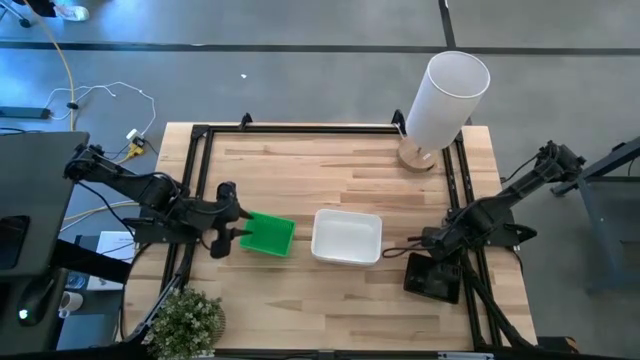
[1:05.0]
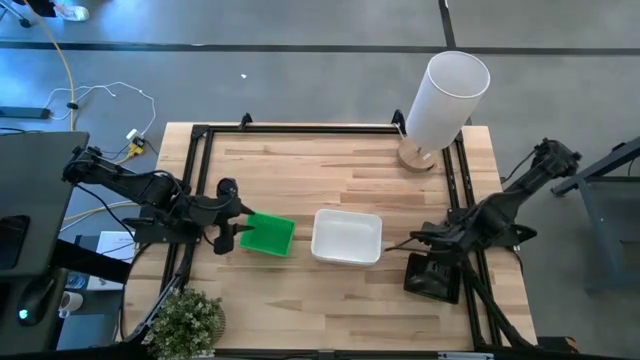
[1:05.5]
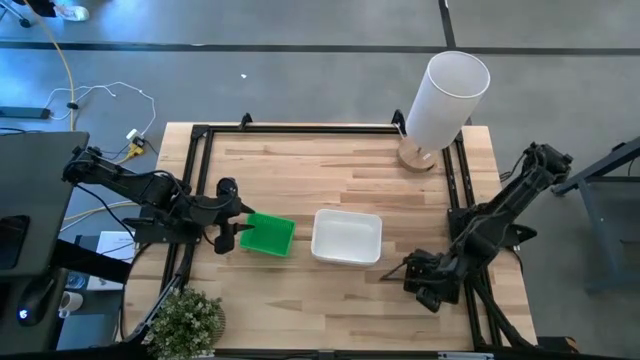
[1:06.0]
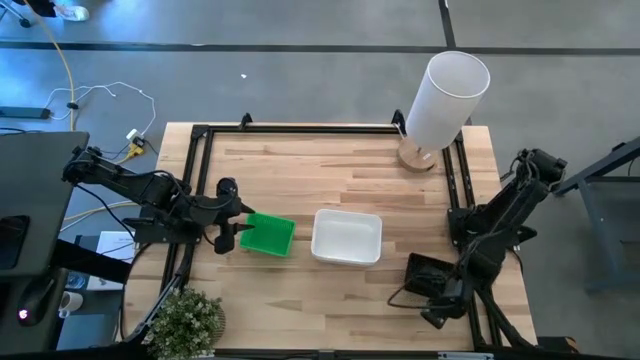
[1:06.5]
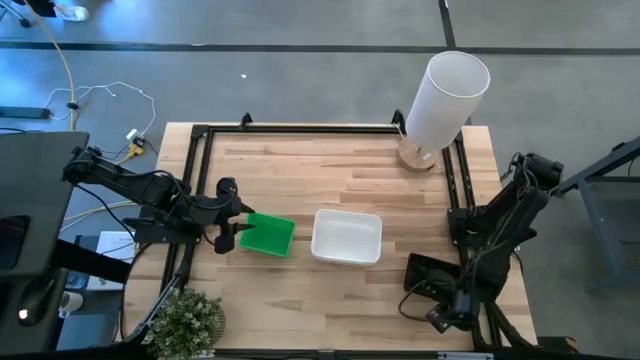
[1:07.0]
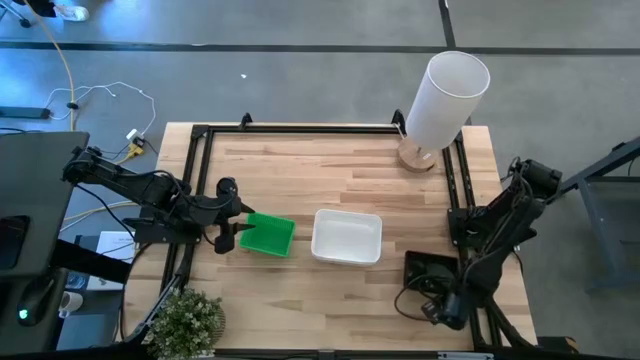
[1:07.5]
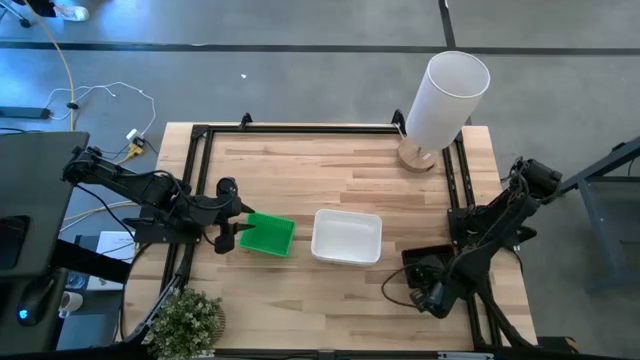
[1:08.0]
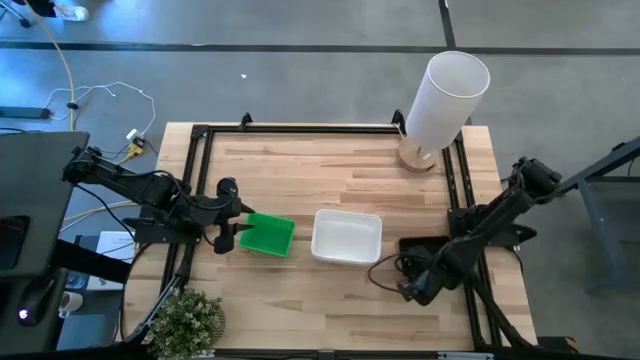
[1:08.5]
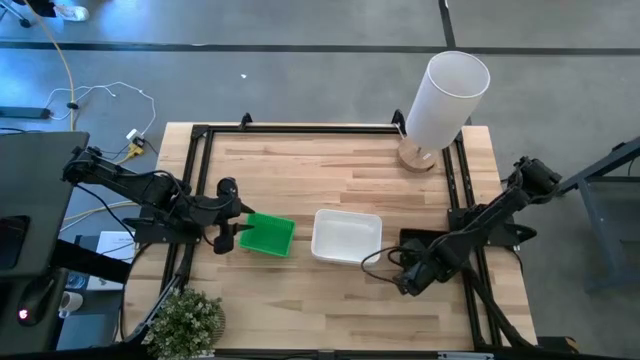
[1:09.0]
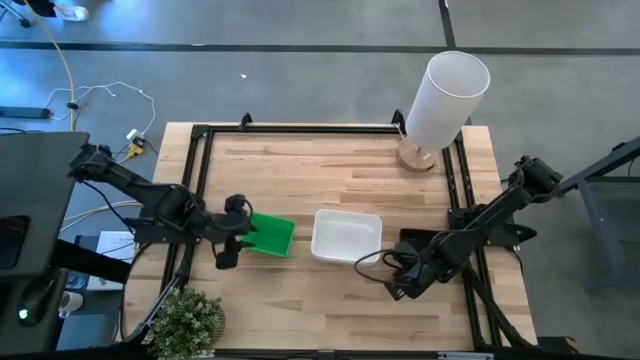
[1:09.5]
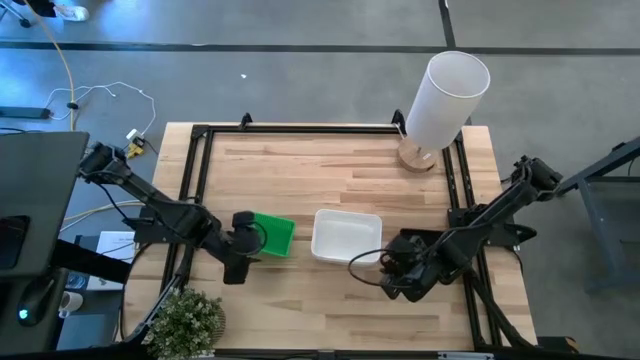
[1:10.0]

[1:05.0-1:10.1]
Adjust the stacked black bins

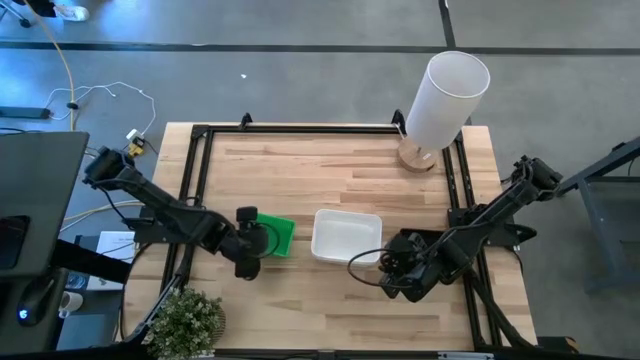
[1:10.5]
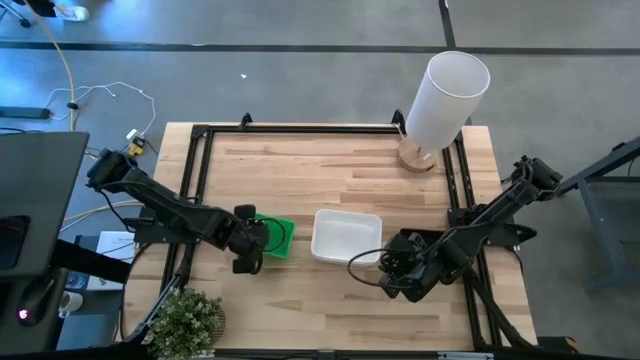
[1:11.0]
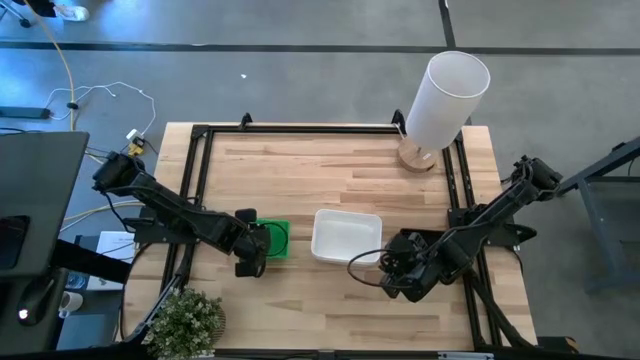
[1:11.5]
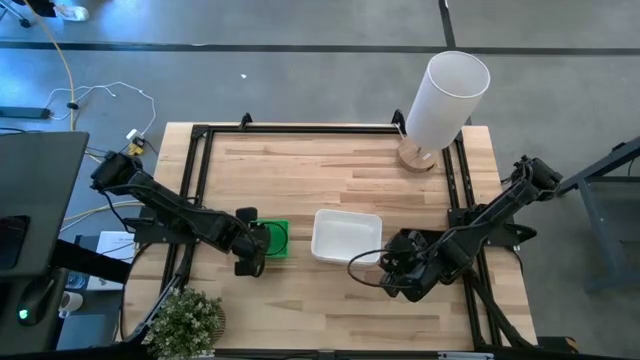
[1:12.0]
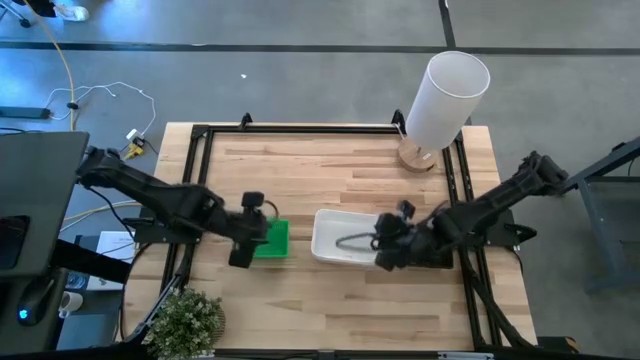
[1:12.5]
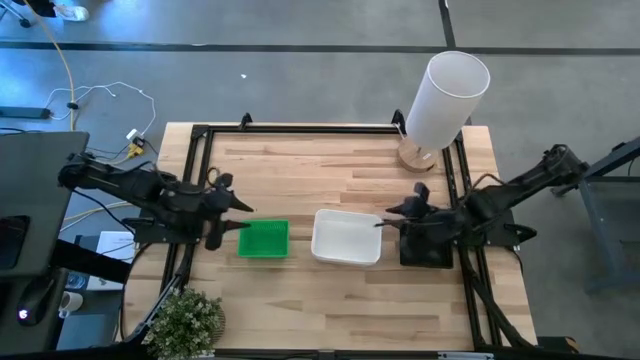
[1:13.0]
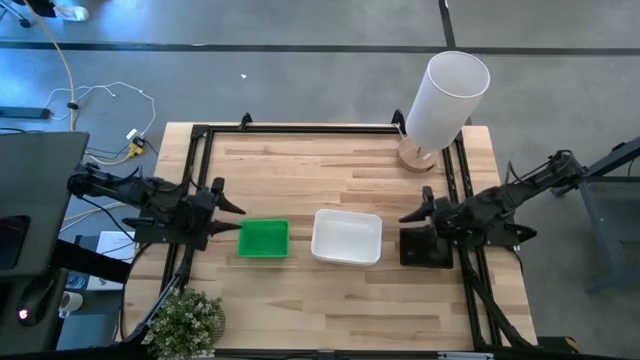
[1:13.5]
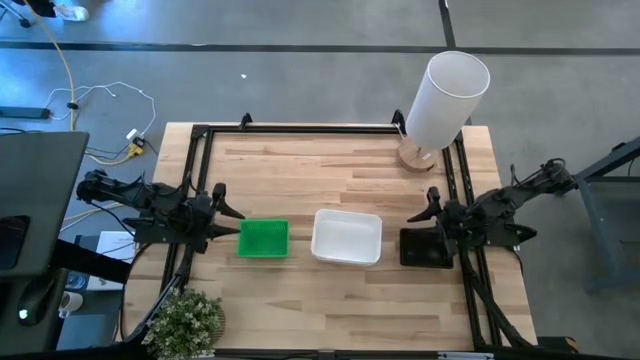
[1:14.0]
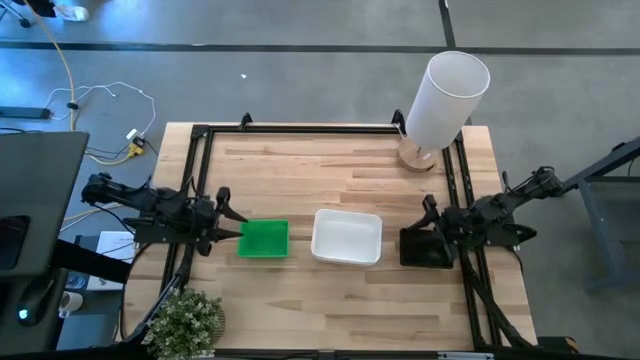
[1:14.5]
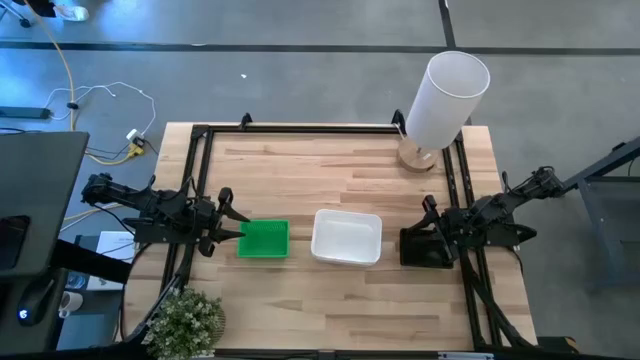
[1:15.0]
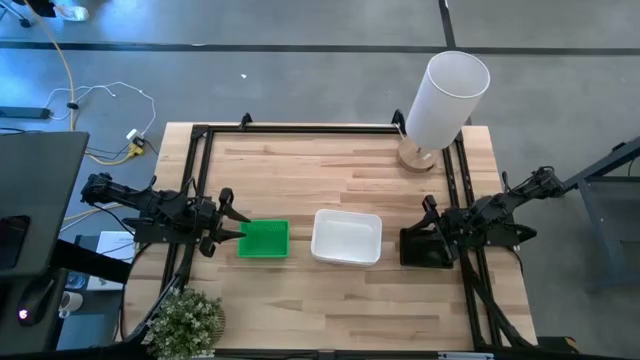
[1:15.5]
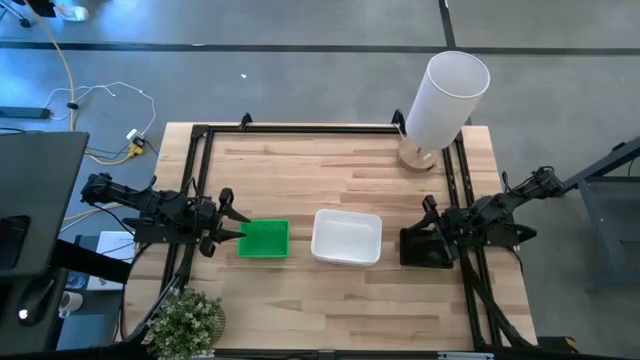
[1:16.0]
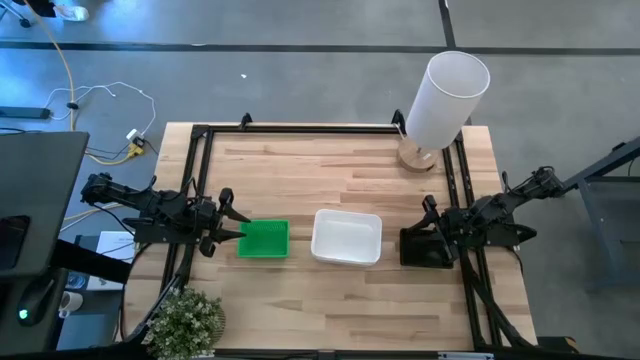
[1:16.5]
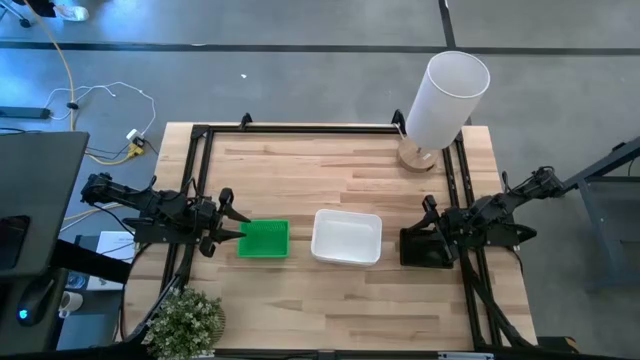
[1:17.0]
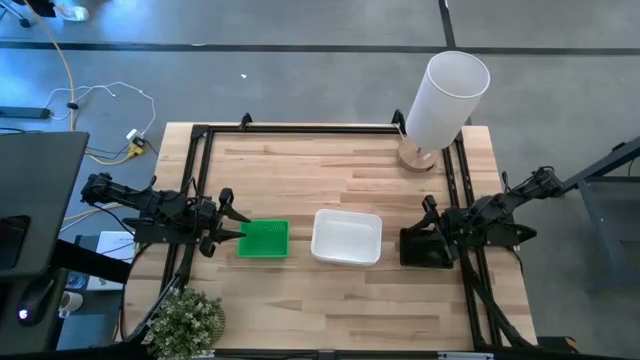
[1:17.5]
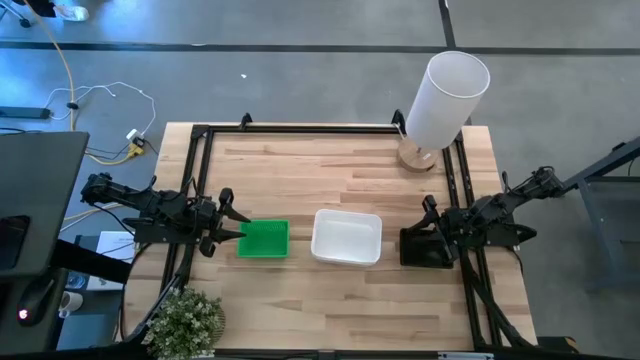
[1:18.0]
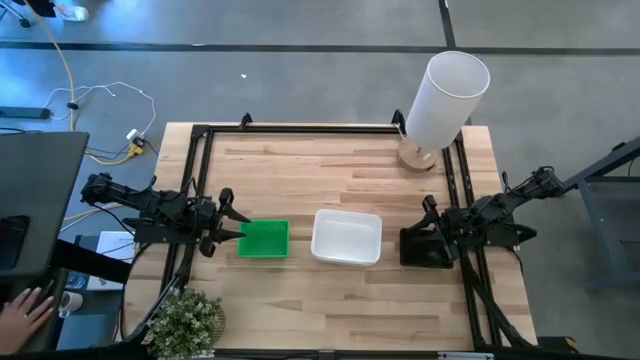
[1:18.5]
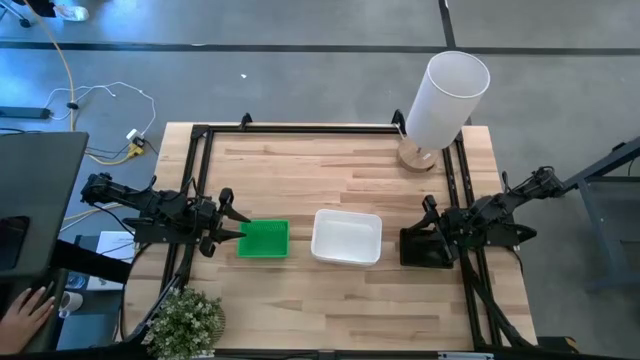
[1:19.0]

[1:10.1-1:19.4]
Return to Home Position

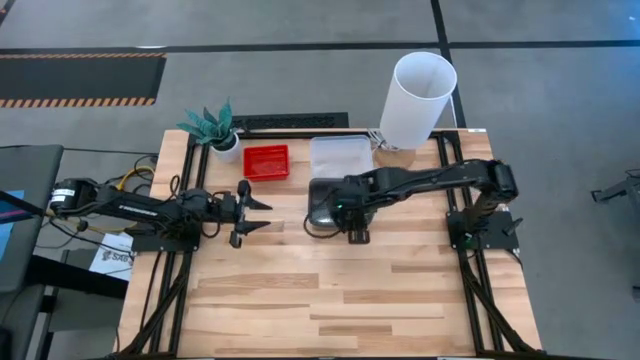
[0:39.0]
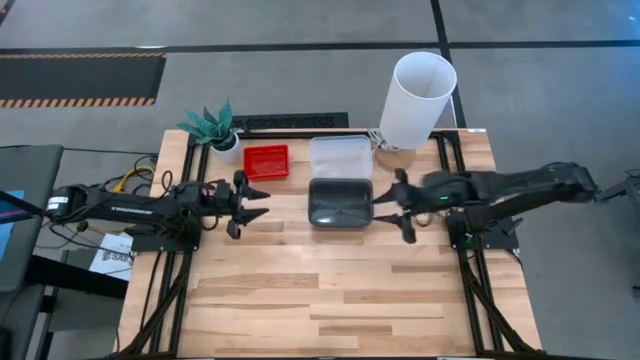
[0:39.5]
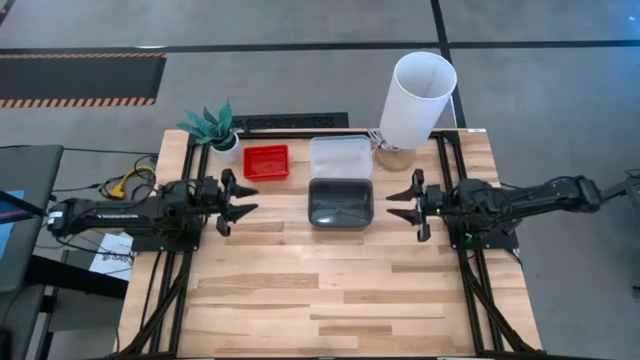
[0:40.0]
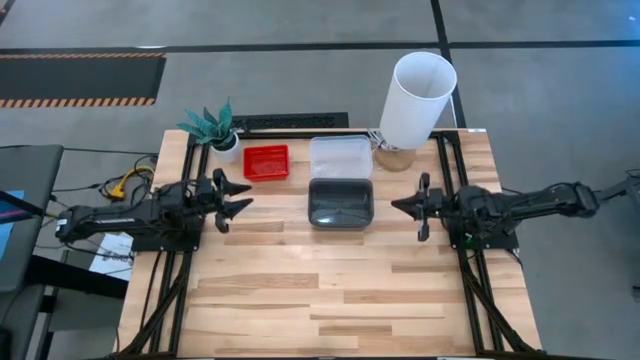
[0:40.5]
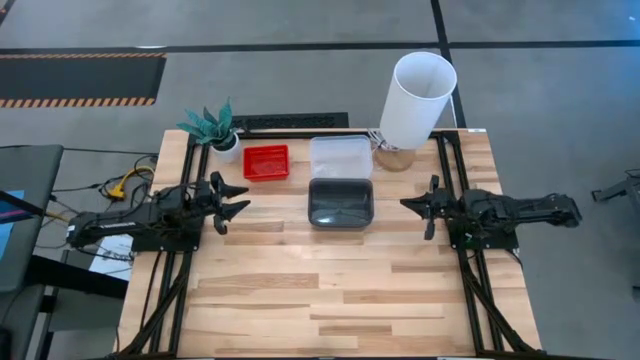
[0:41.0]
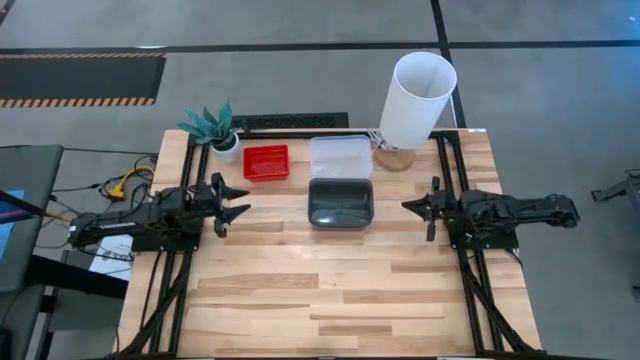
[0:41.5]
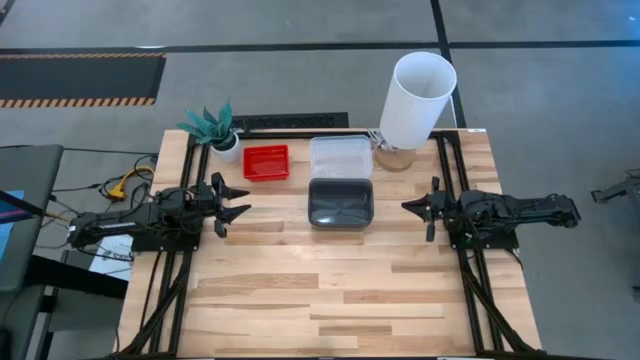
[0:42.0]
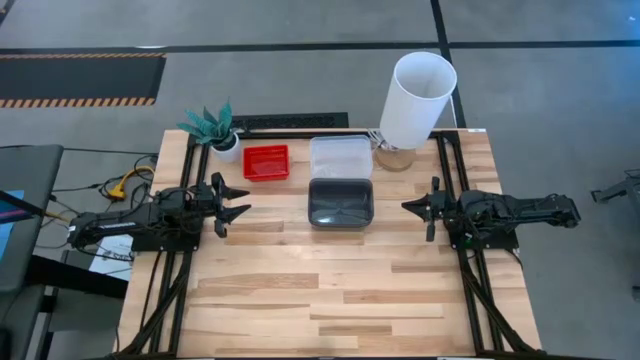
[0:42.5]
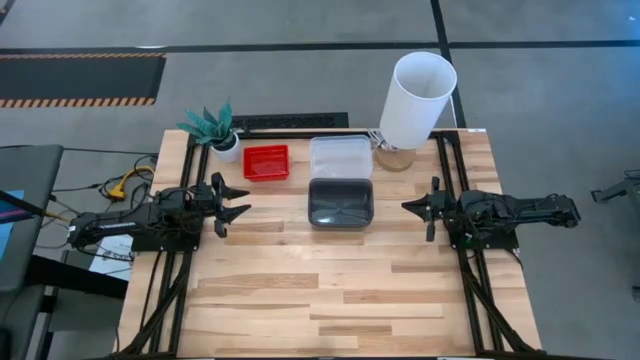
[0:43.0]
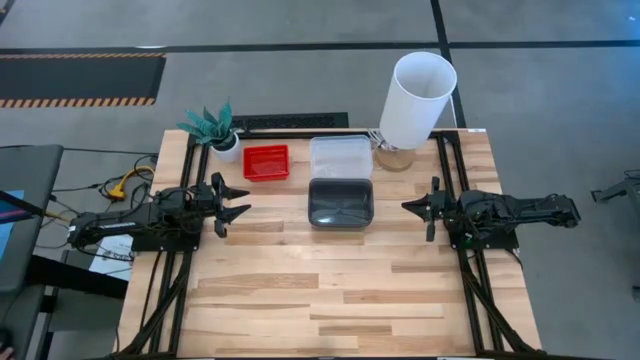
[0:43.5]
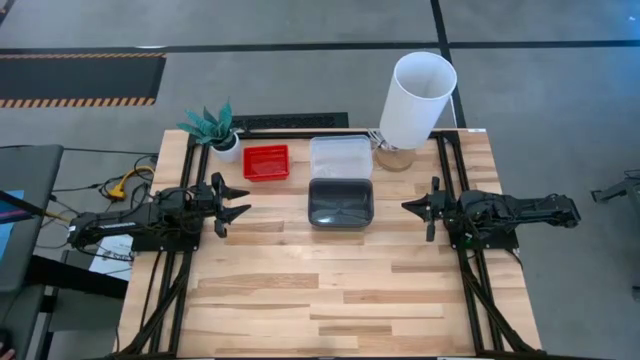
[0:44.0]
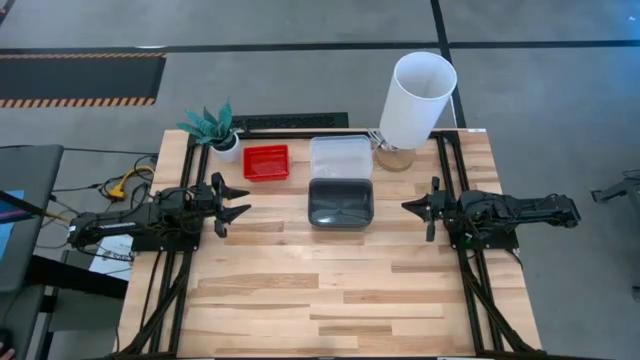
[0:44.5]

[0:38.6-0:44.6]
Return to Home Position
